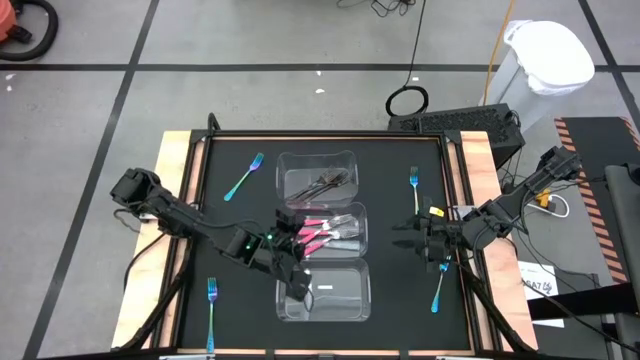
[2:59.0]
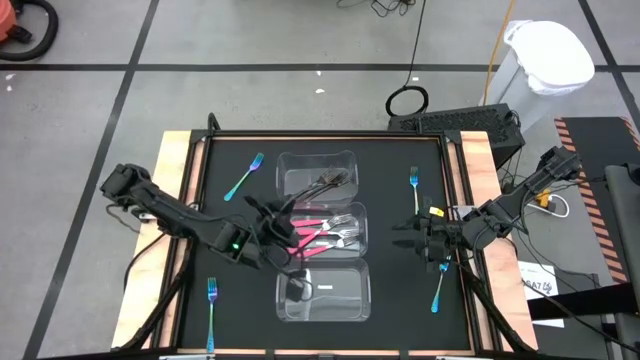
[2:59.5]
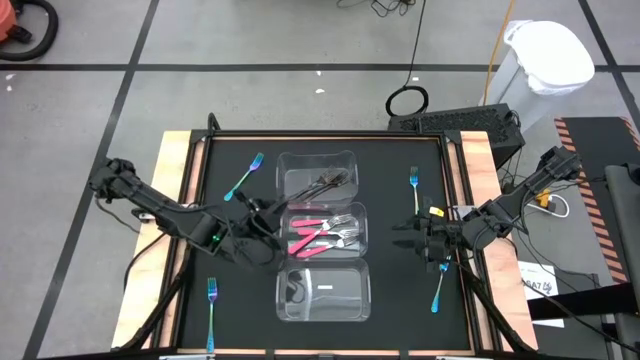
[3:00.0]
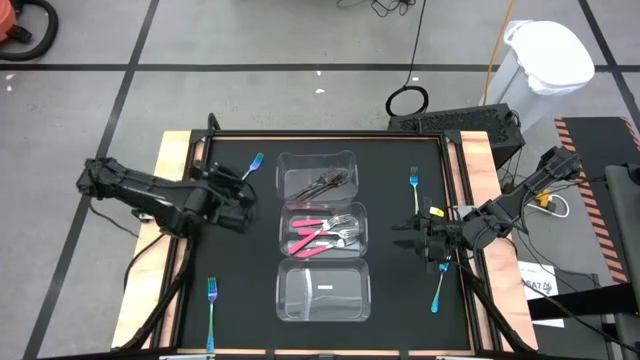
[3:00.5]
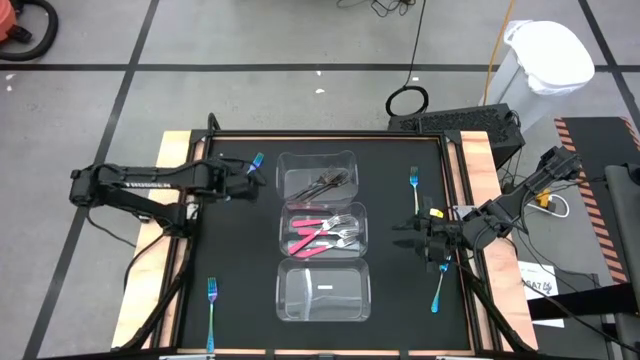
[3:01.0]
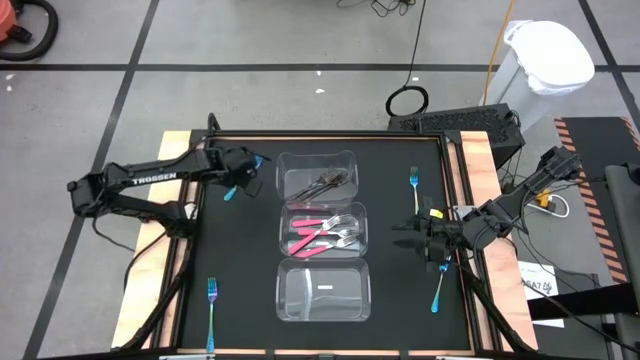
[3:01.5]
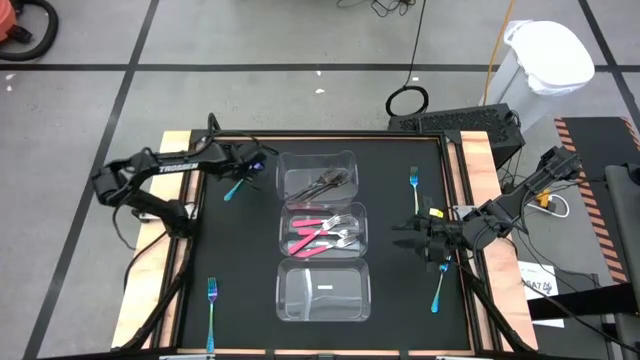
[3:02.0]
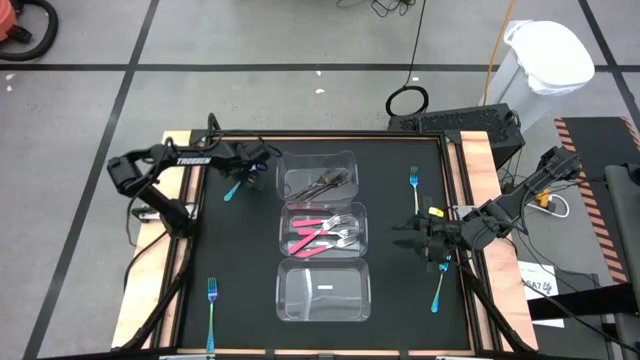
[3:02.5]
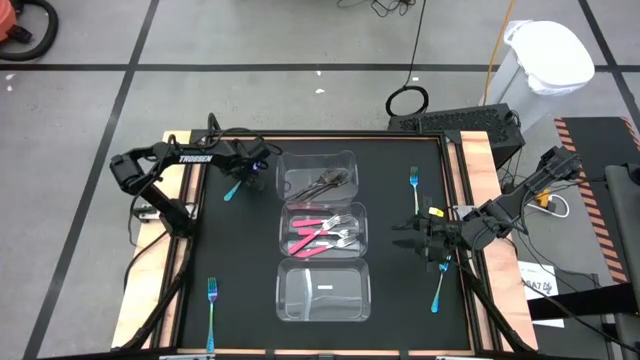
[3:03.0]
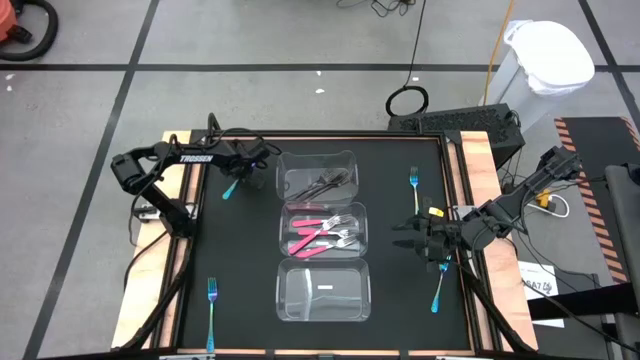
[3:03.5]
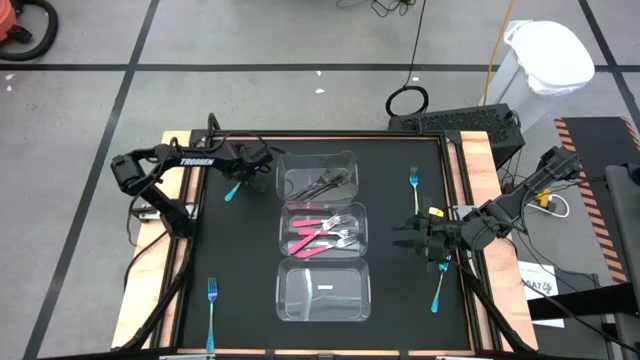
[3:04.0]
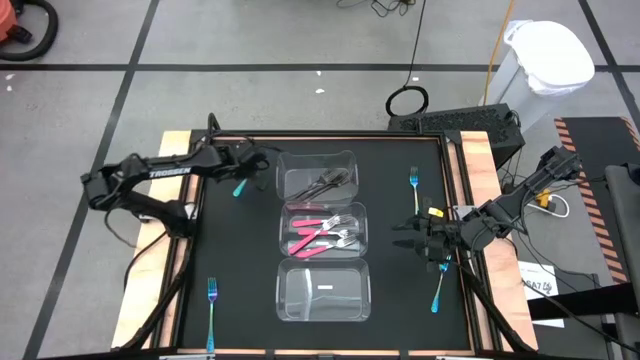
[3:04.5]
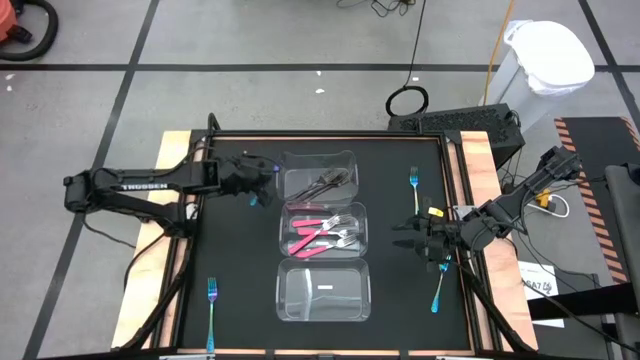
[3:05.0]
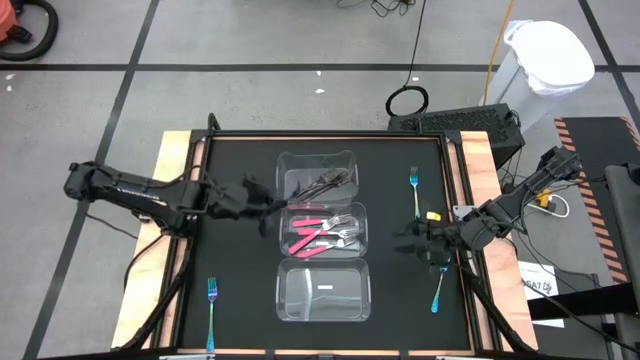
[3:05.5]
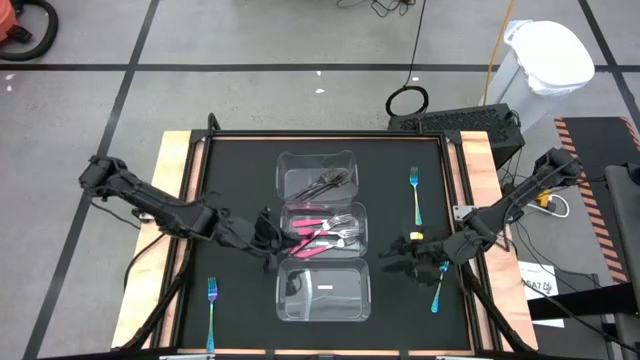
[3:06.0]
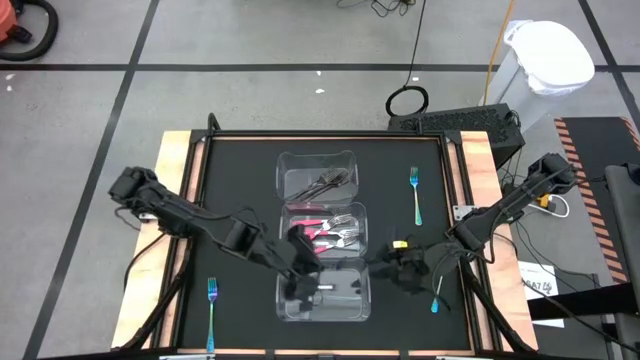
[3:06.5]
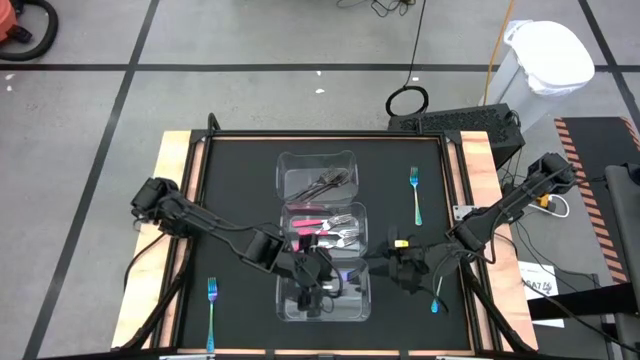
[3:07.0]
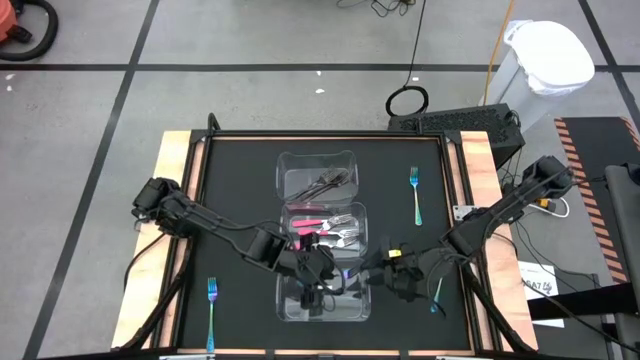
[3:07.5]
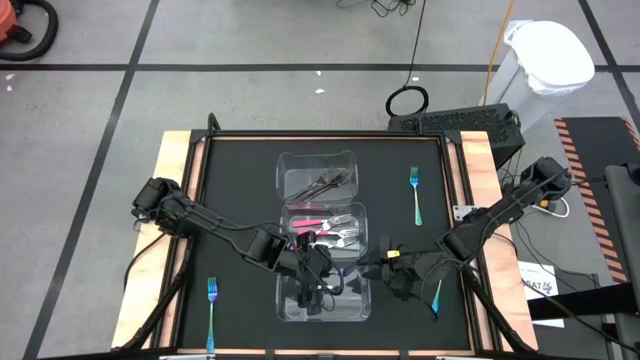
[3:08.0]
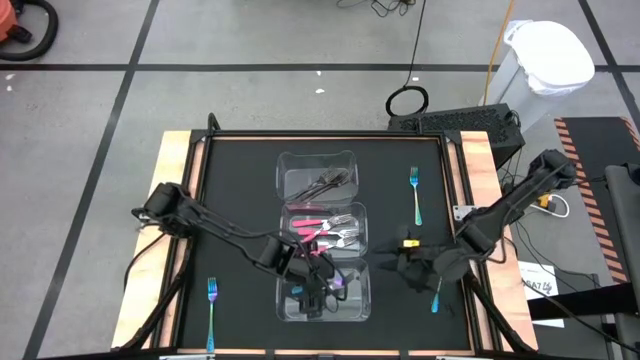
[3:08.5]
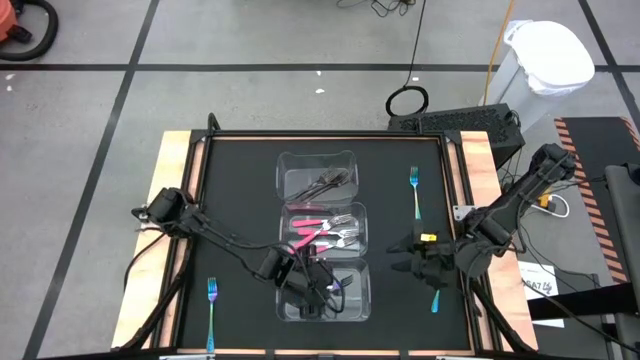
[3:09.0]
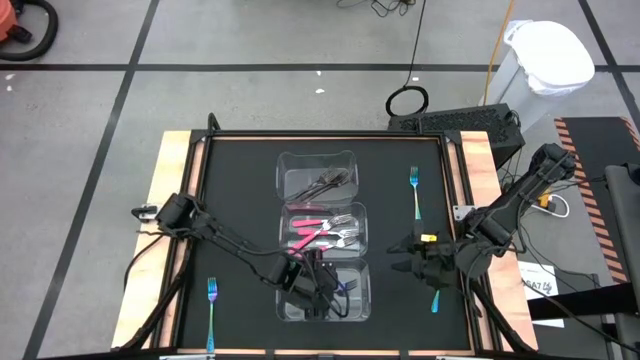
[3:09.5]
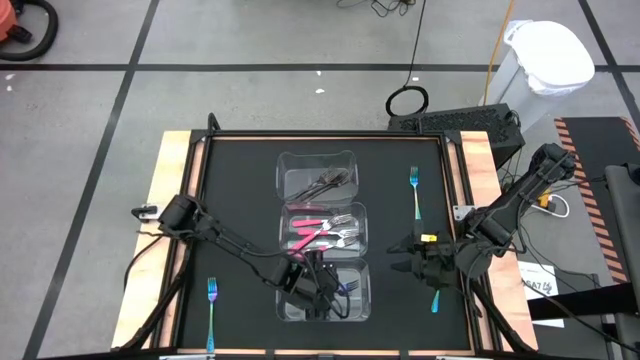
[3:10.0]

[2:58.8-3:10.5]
Task: Sort silverware by color (type)
Put the top left blue fork into the bottom transparent bin

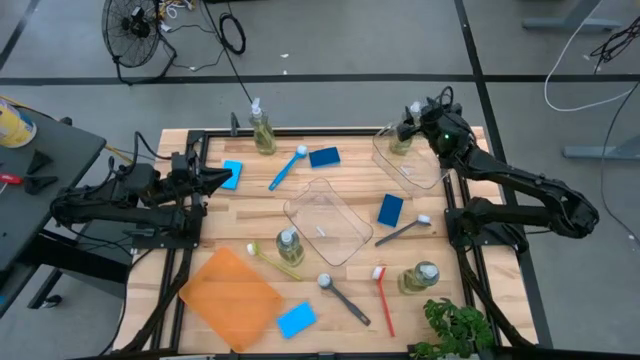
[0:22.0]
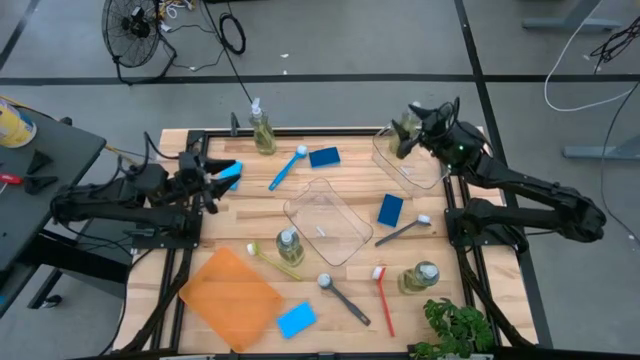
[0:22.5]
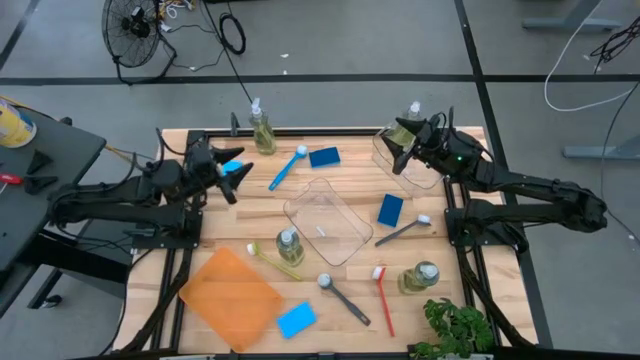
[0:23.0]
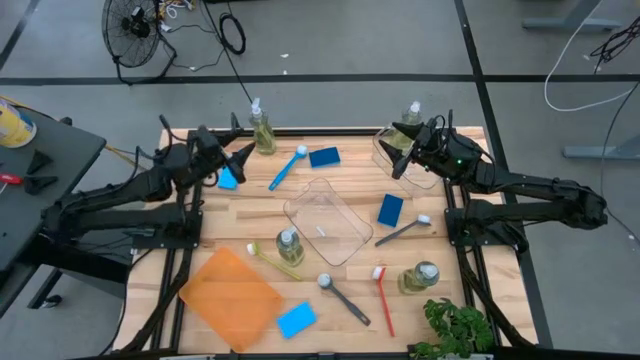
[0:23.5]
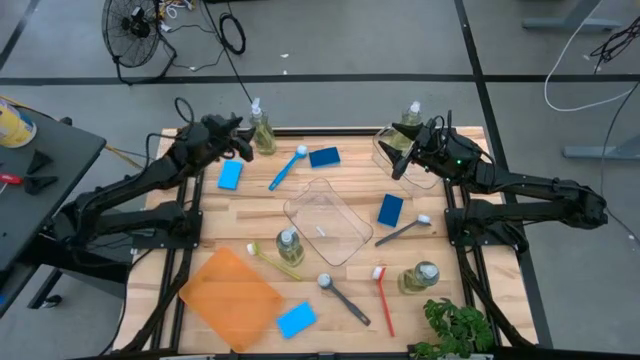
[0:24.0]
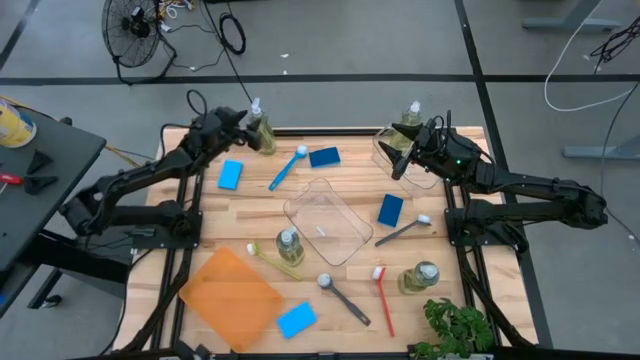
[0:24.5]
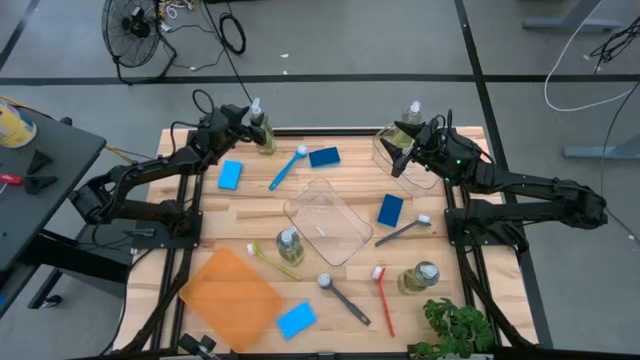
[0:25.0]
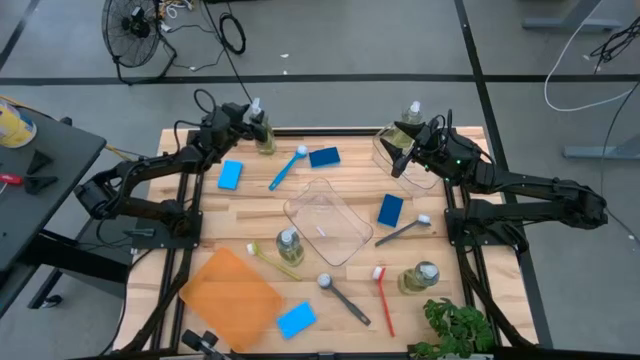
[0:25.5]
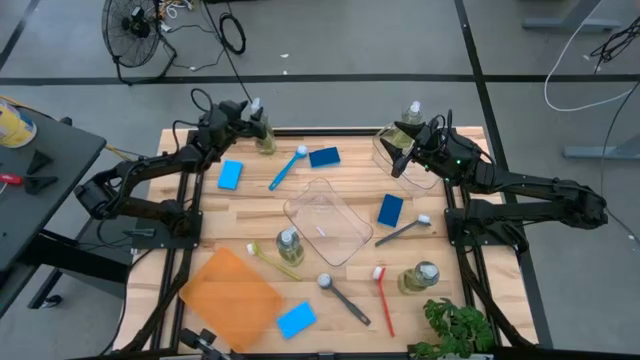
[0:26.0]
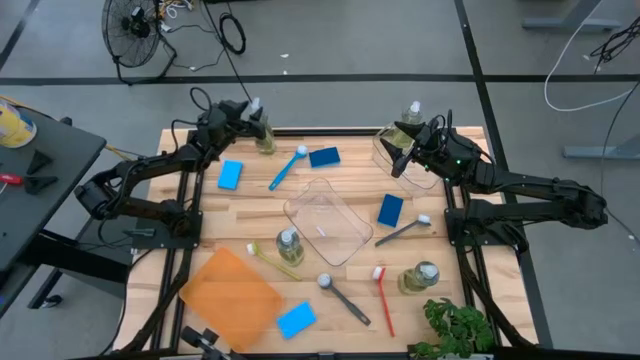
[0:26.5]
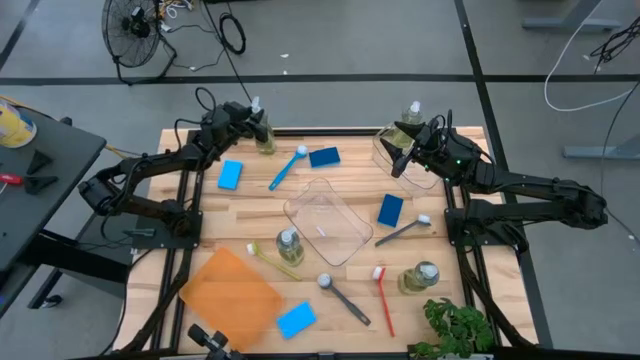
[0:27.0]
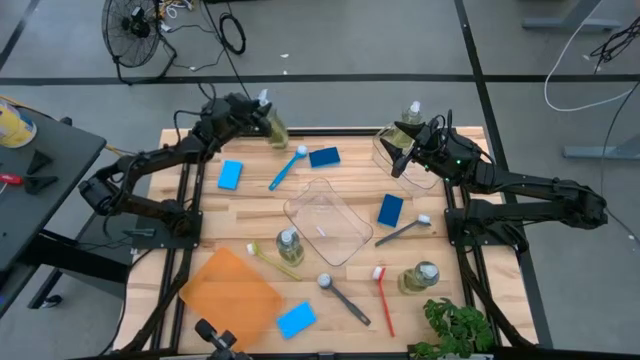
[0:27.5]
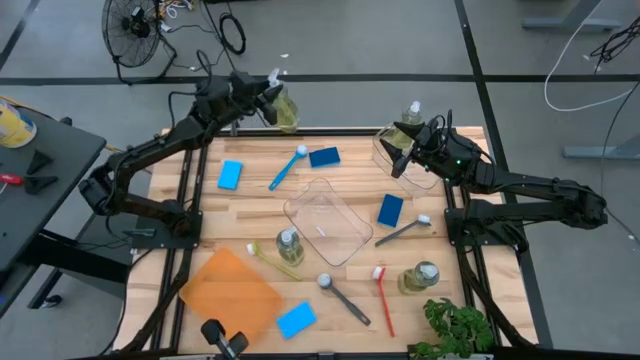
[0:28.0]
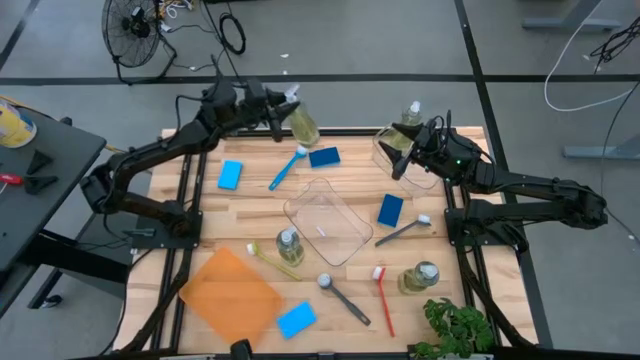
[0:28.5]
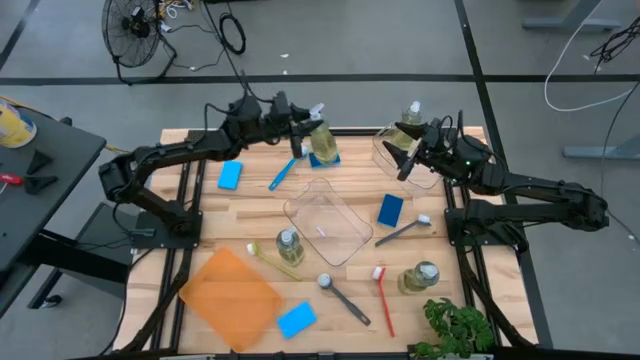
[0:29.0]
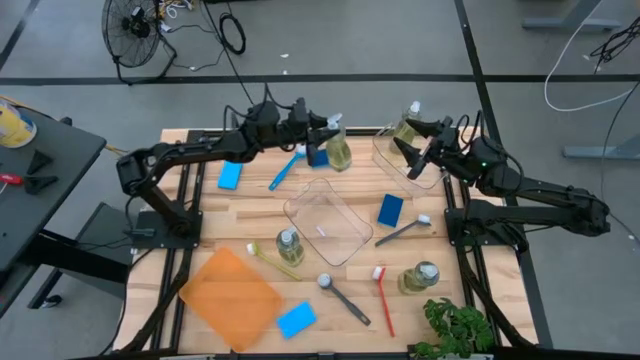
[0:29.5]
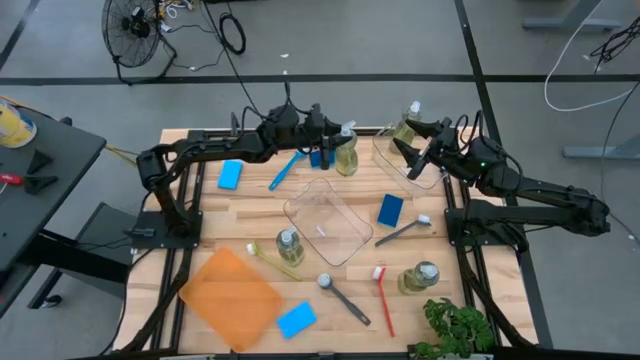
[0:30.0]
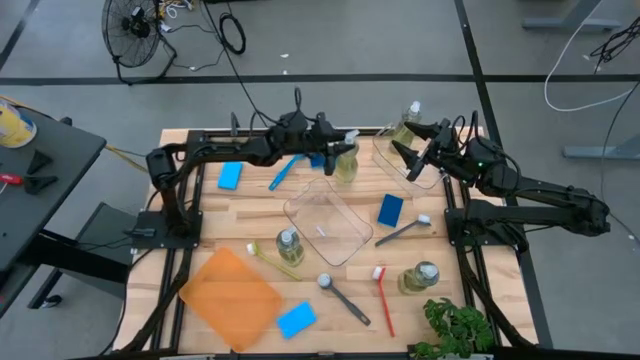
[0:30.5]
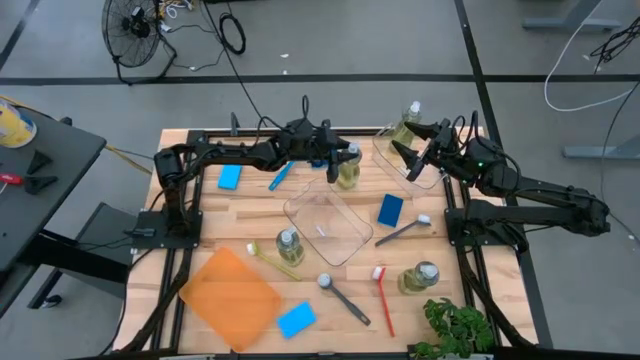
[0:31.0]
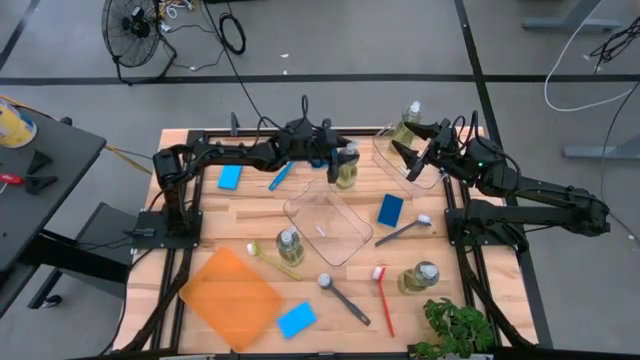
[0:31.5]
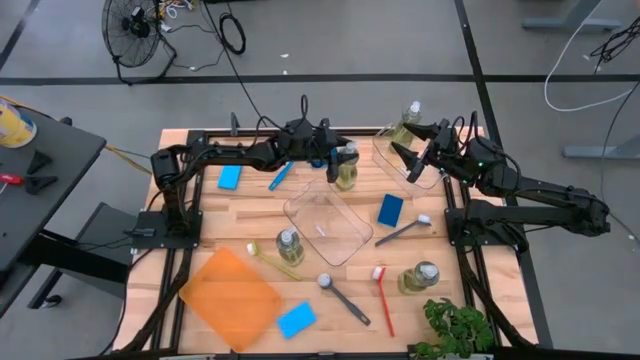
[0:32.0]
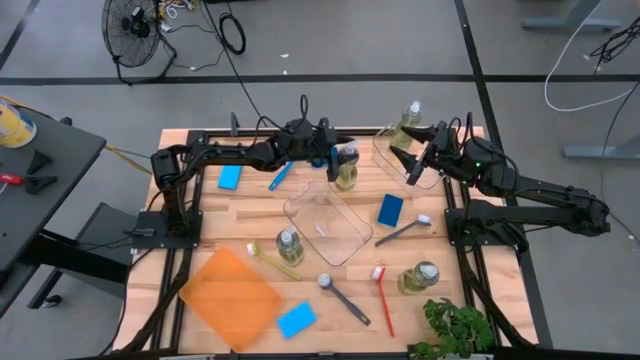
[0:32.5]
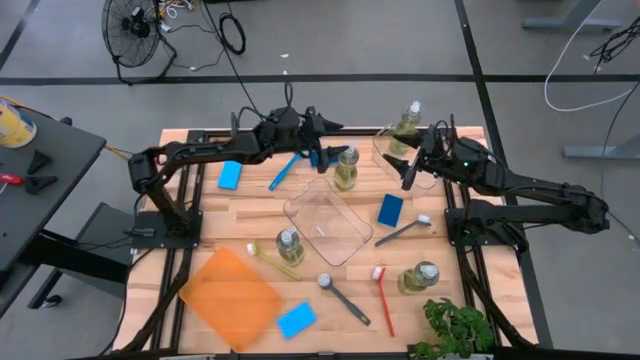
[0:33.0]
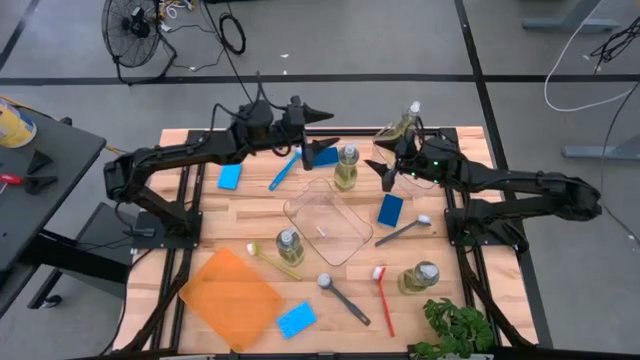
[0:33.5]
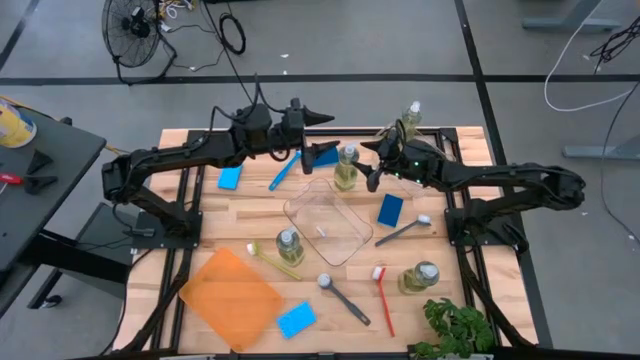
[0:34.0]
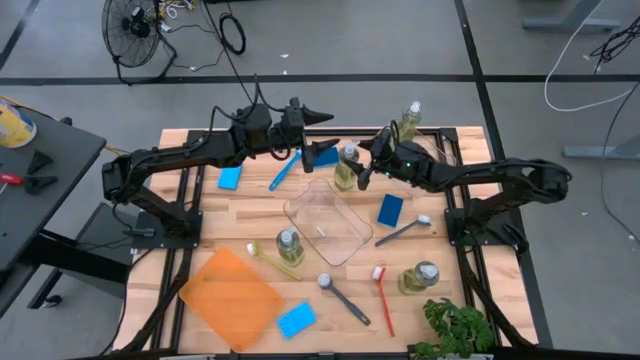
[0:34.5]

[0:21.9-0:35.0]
Task: Pick & Place Kitchen Sink Supplies
Put the yellow dish soap into the top transparent bin
